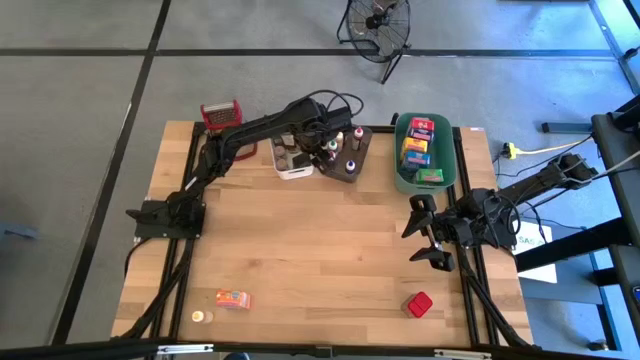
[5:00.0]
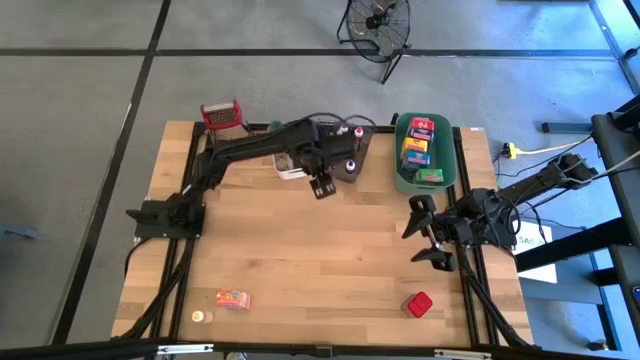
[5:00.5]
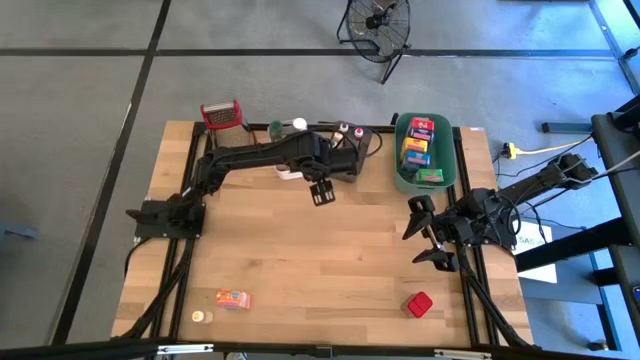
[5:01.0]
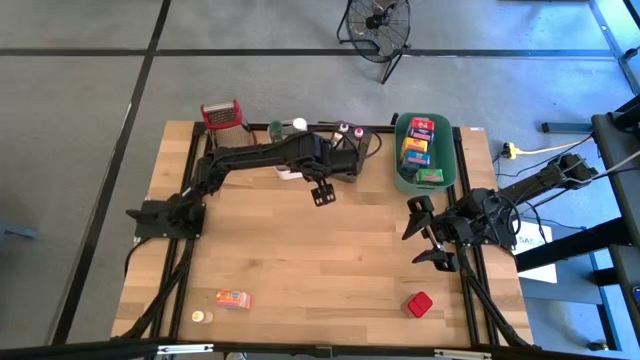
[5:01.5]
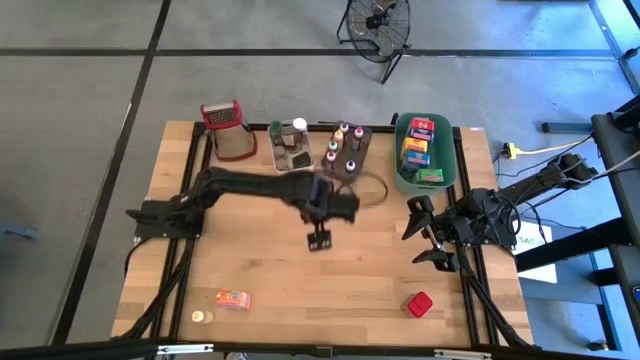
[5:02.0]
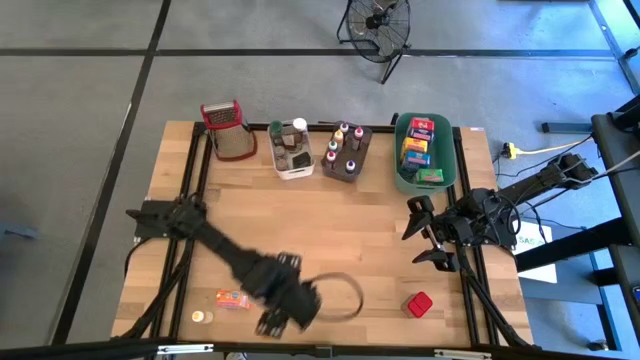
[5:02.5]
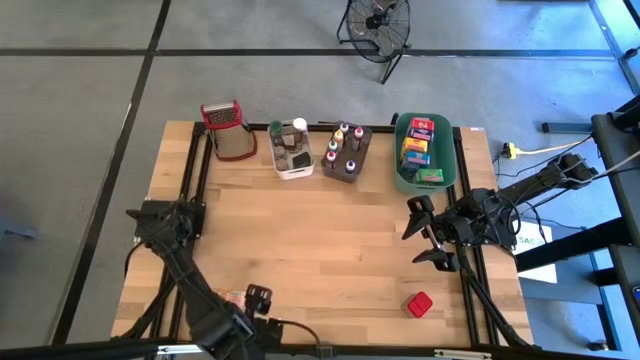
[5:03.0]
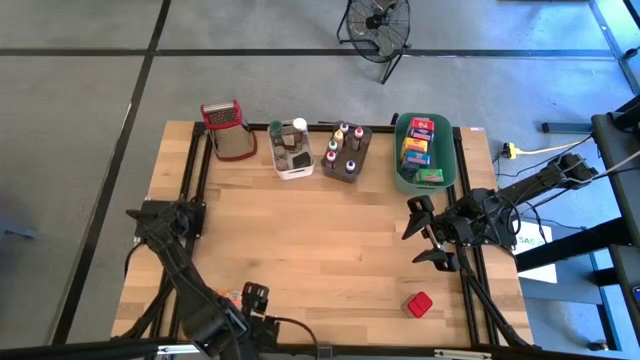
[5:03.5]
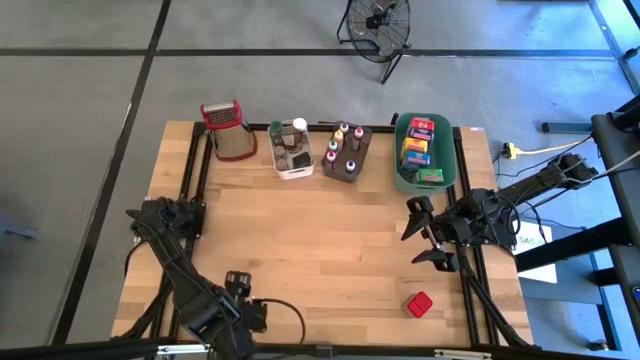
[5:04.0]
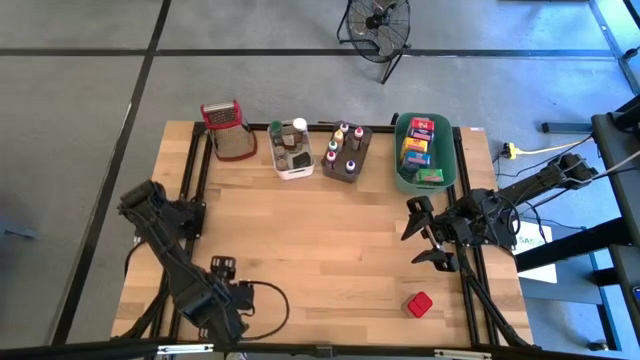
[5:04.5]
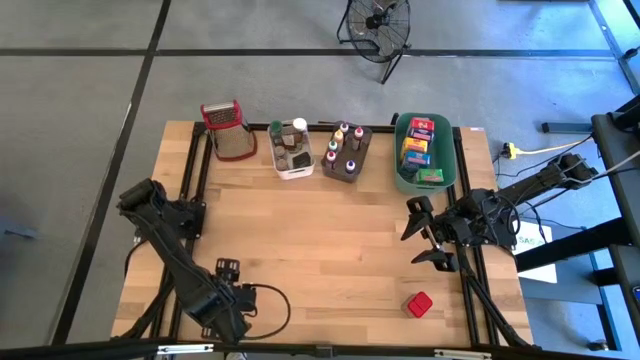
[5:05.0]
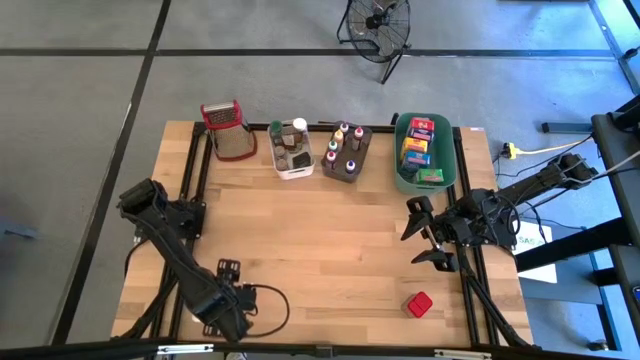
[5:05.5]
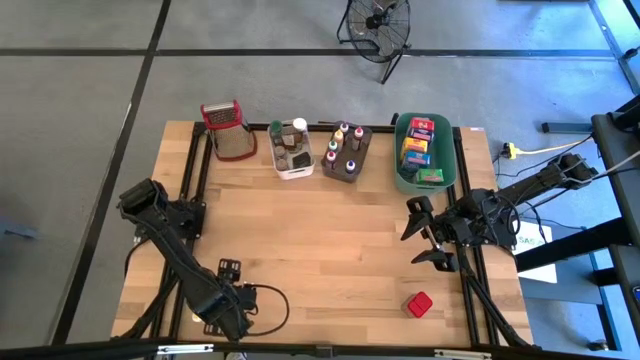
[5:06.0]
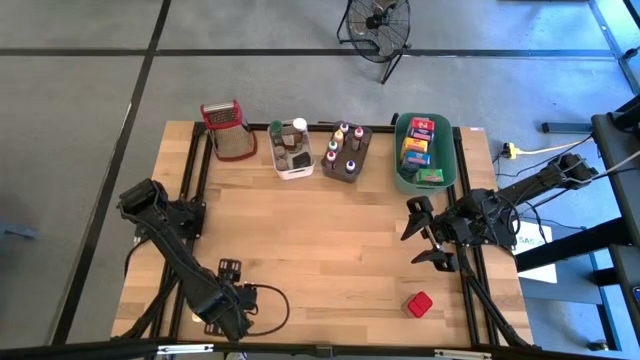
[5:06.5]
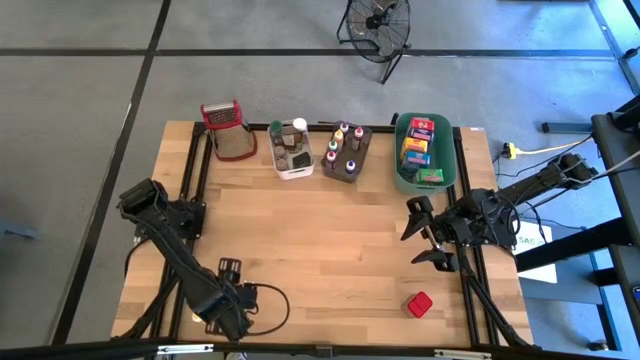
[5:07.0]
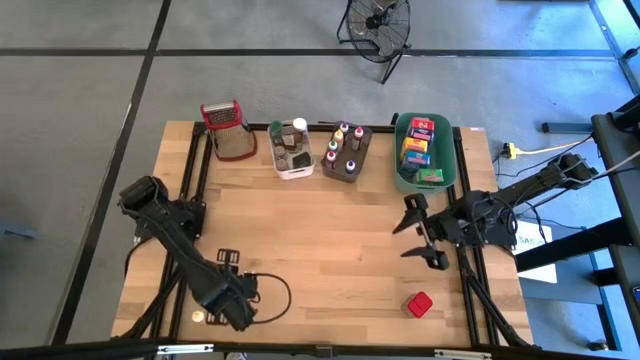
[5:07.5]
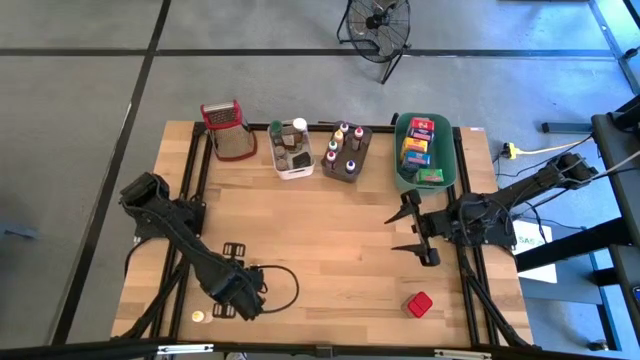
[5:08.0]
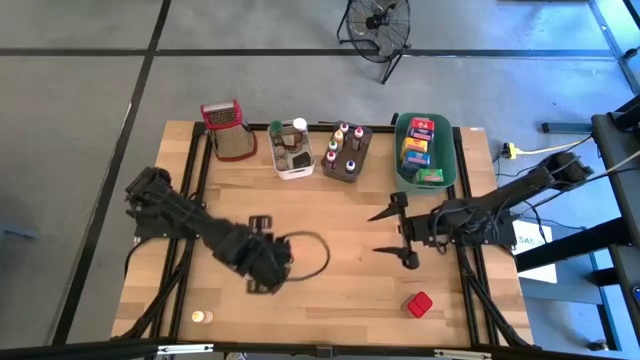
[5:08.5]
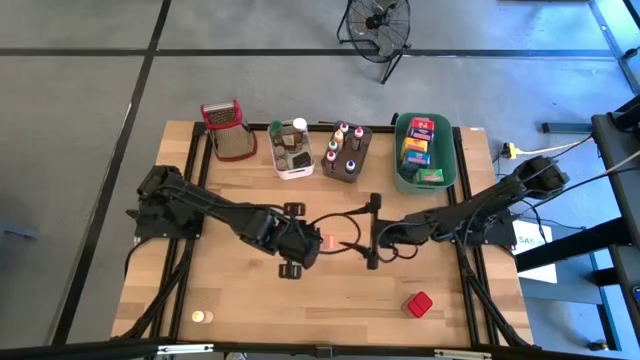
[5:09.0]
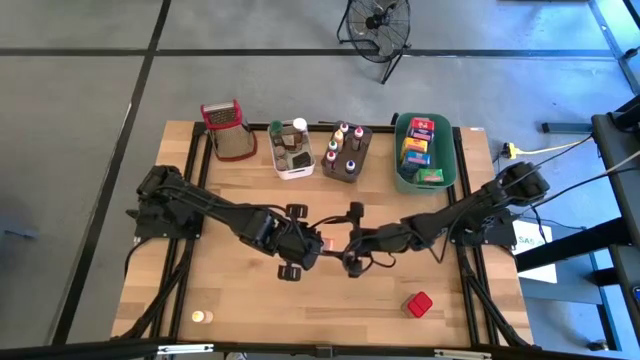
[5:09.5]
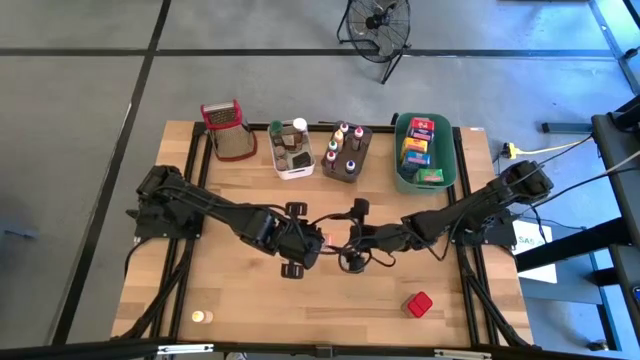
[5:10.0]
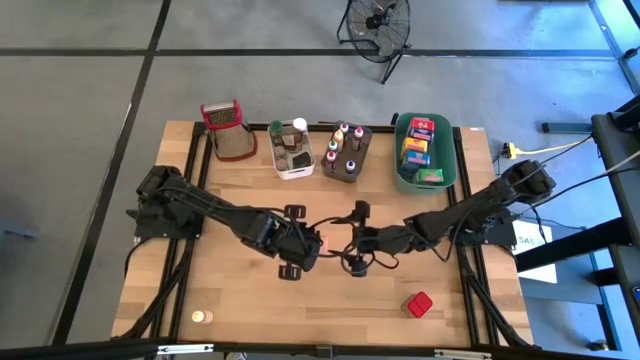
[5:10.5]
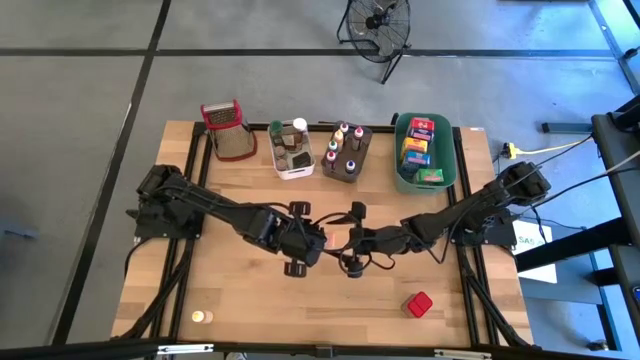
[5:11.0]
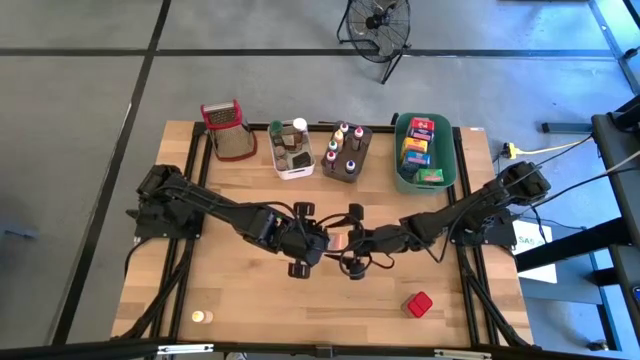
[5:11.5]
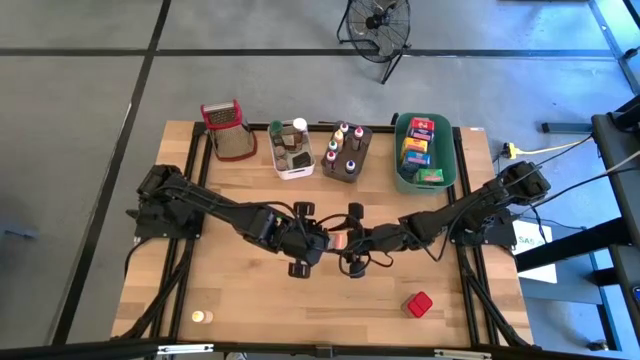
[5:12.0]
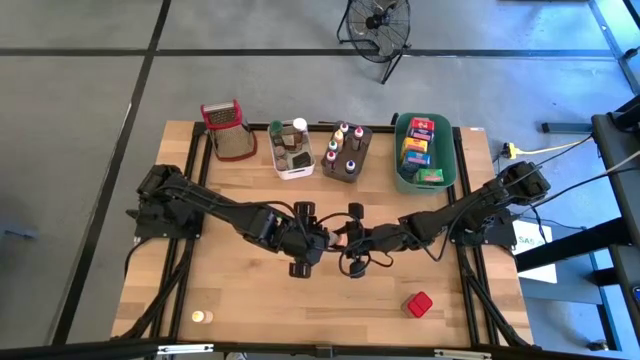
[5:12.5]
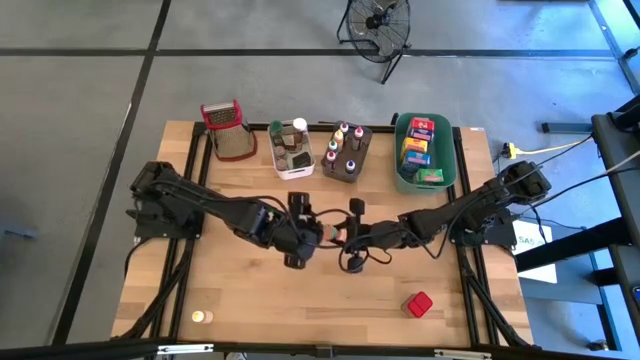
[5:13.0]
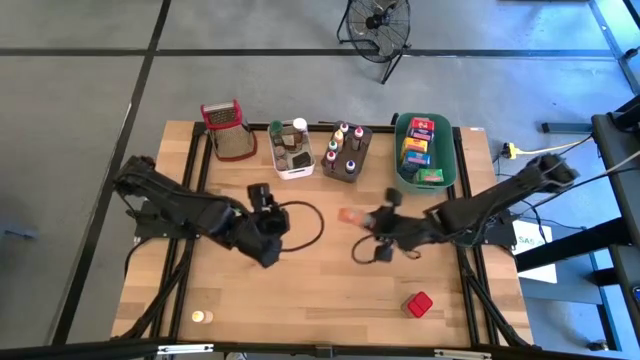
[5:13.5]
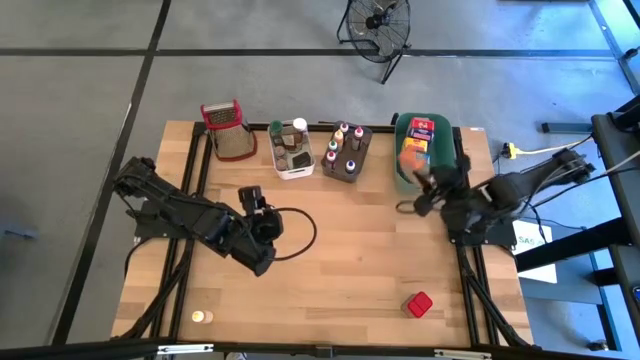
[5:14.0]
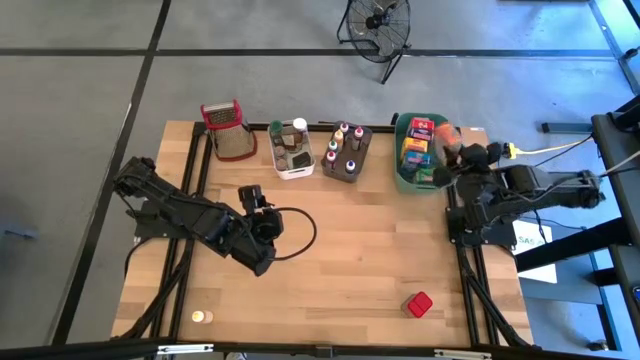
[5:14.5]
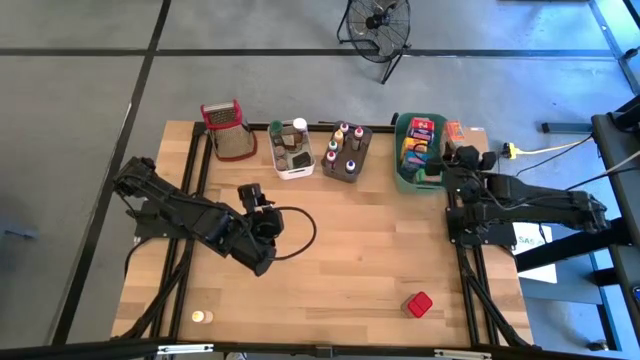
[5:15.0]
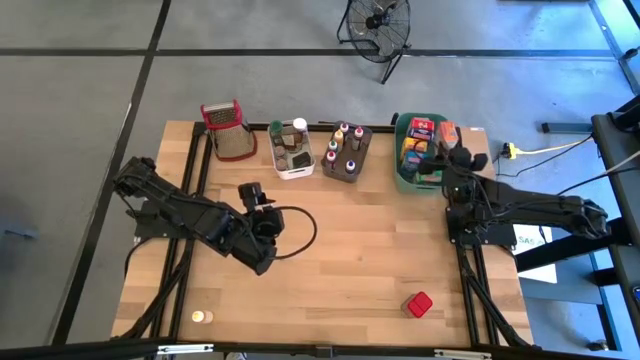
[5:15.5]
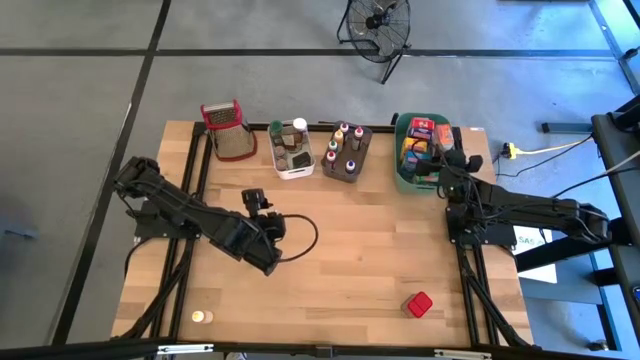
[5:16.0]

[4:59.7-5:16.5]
Task: Pick & Place Kitchen Items
Put the orange cereal box into the green bin
